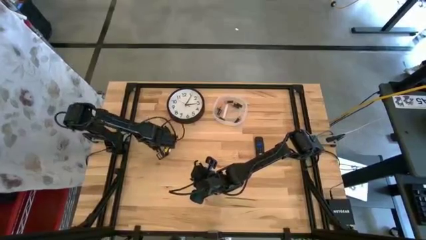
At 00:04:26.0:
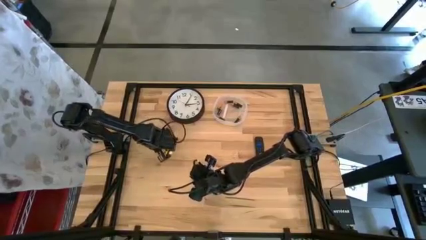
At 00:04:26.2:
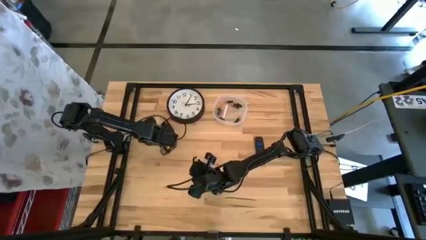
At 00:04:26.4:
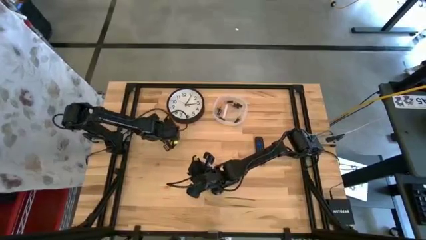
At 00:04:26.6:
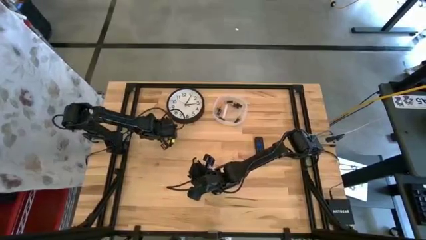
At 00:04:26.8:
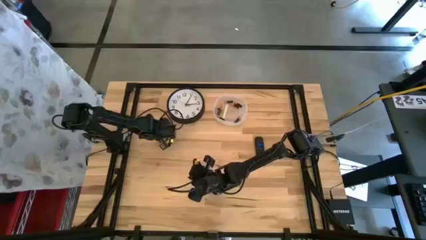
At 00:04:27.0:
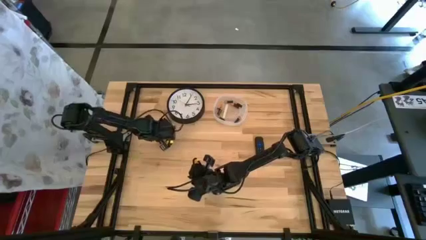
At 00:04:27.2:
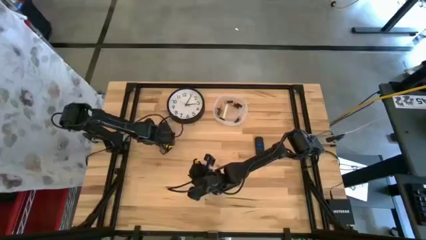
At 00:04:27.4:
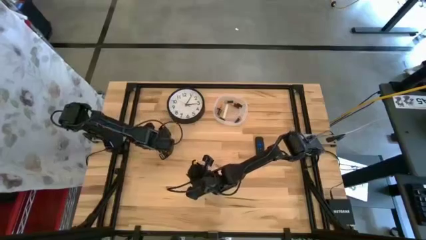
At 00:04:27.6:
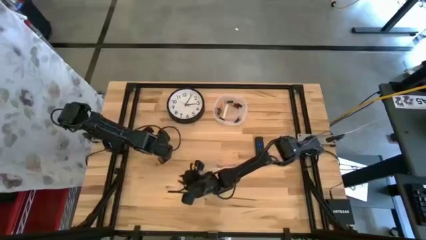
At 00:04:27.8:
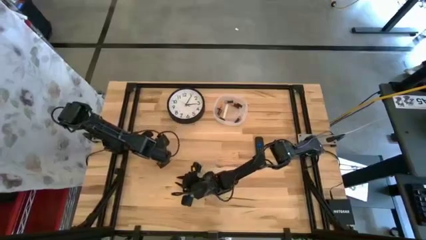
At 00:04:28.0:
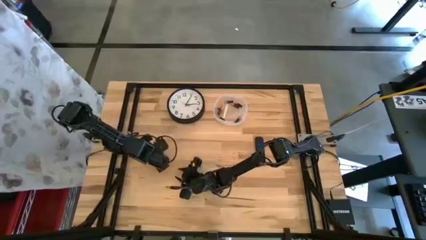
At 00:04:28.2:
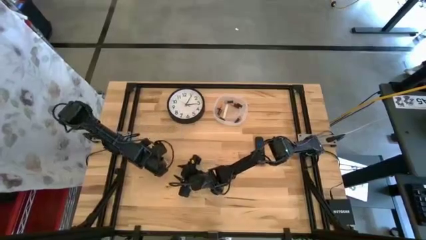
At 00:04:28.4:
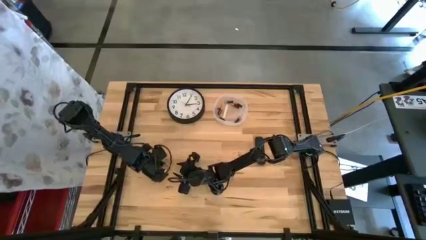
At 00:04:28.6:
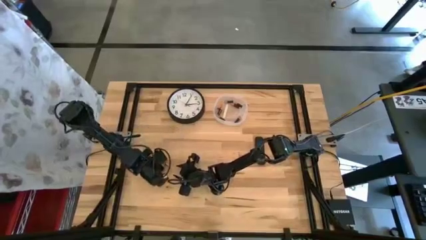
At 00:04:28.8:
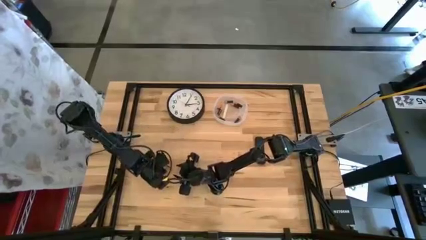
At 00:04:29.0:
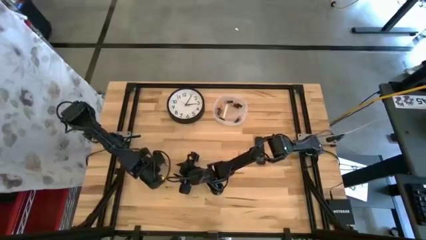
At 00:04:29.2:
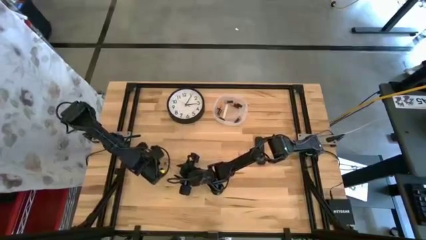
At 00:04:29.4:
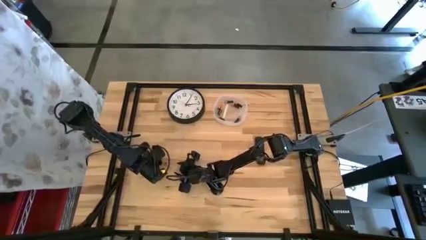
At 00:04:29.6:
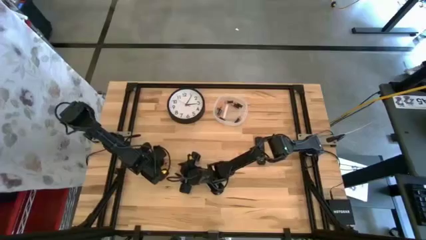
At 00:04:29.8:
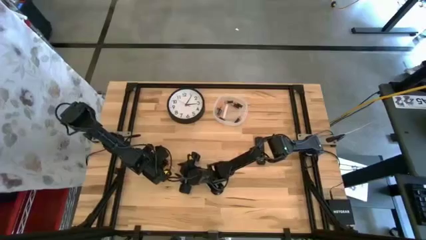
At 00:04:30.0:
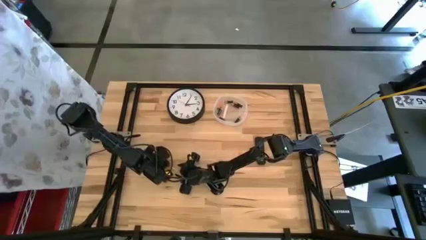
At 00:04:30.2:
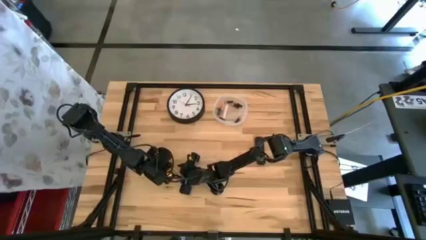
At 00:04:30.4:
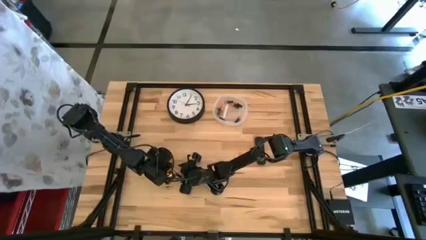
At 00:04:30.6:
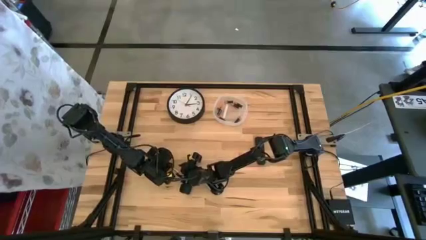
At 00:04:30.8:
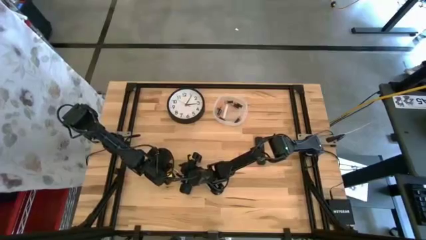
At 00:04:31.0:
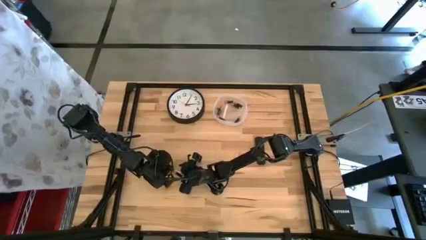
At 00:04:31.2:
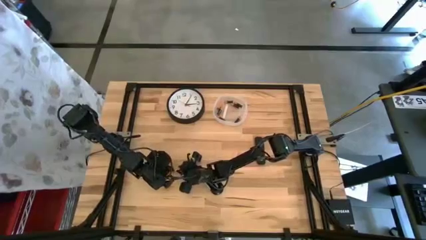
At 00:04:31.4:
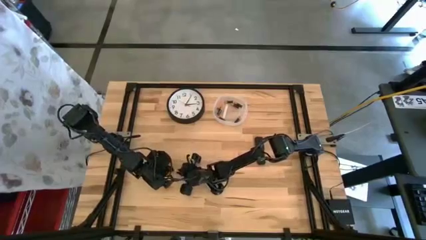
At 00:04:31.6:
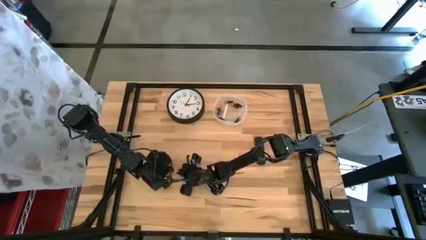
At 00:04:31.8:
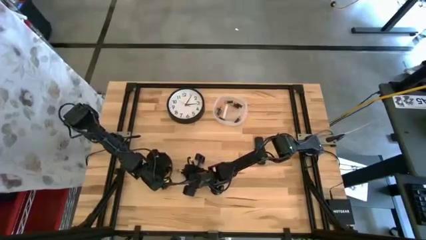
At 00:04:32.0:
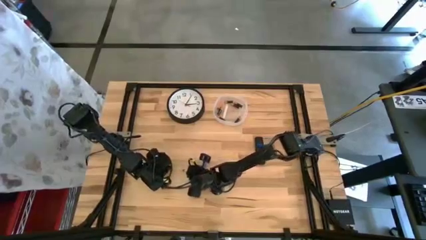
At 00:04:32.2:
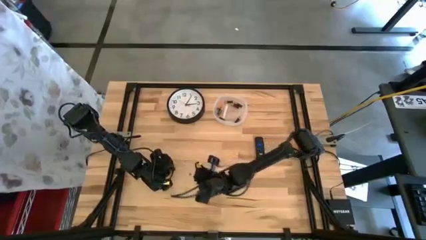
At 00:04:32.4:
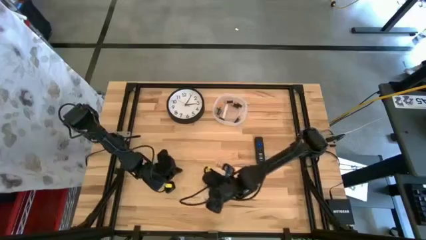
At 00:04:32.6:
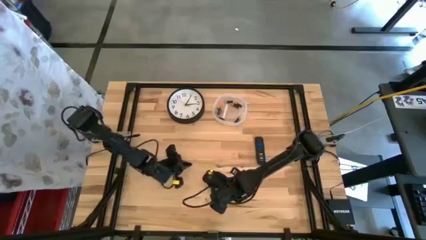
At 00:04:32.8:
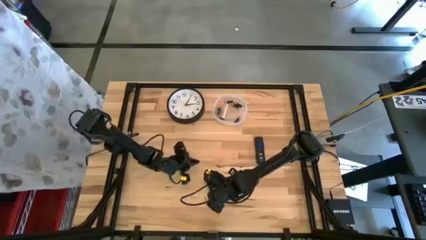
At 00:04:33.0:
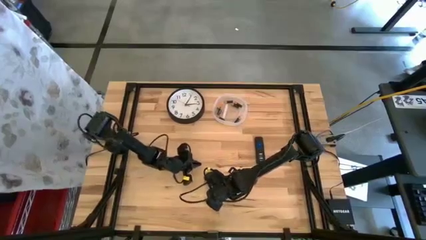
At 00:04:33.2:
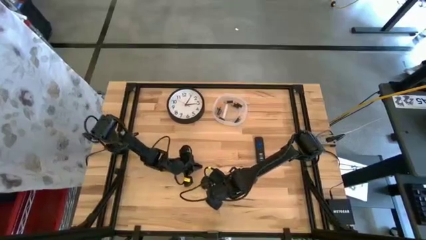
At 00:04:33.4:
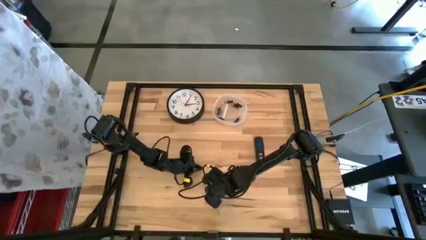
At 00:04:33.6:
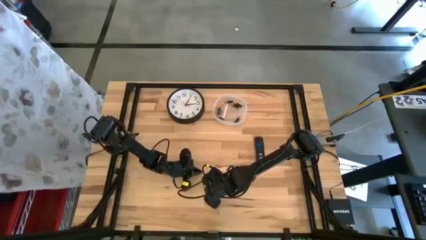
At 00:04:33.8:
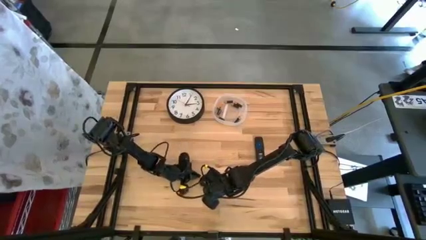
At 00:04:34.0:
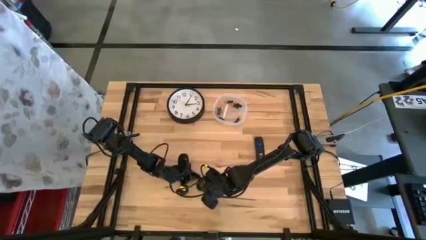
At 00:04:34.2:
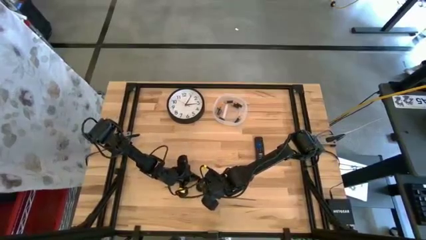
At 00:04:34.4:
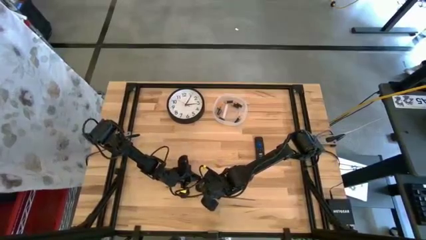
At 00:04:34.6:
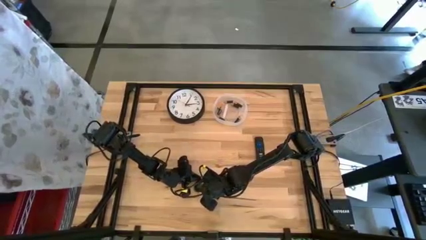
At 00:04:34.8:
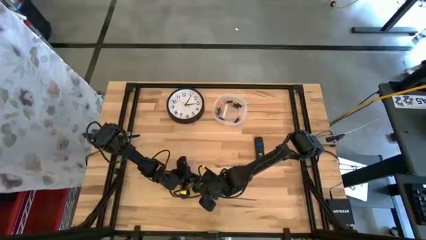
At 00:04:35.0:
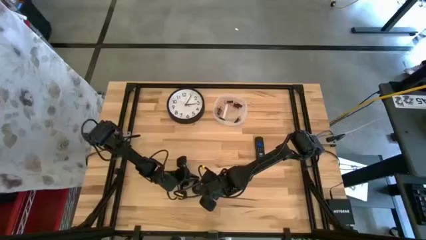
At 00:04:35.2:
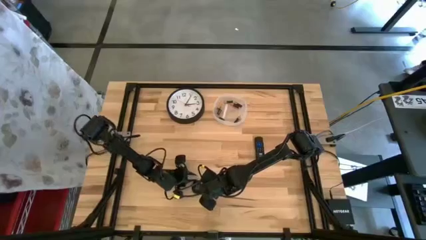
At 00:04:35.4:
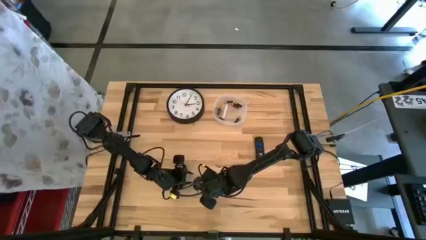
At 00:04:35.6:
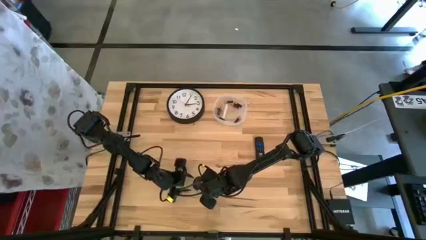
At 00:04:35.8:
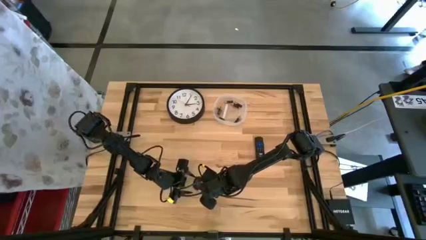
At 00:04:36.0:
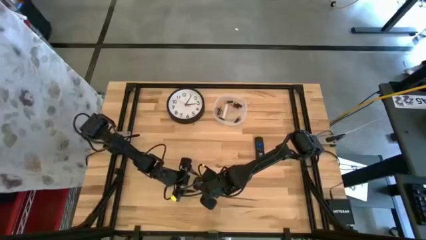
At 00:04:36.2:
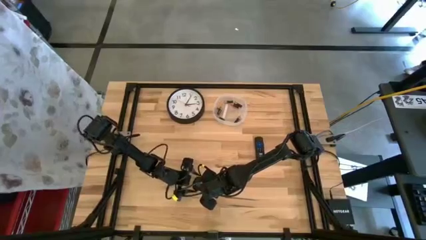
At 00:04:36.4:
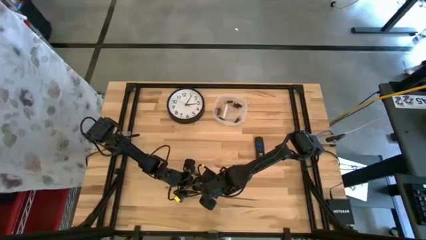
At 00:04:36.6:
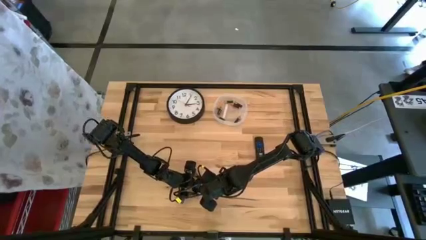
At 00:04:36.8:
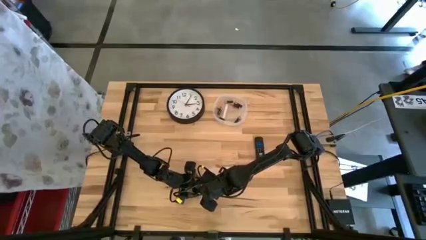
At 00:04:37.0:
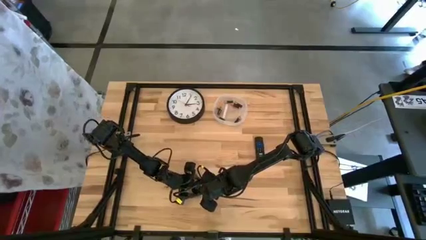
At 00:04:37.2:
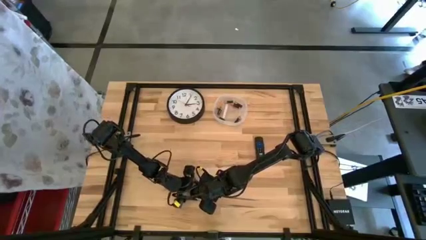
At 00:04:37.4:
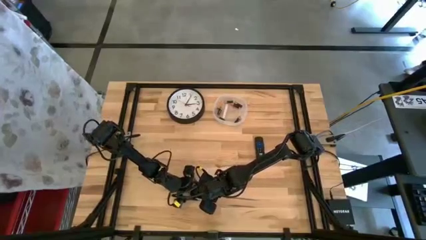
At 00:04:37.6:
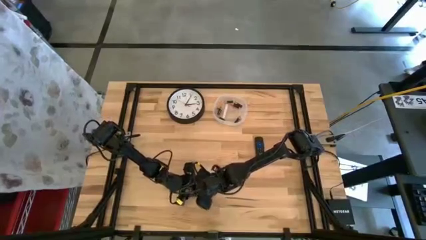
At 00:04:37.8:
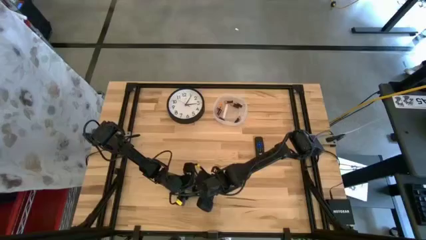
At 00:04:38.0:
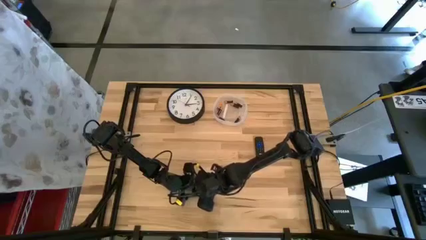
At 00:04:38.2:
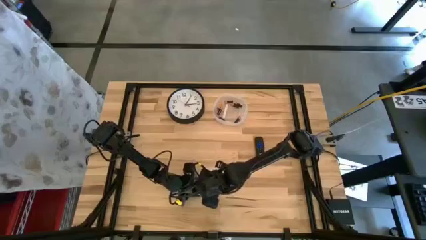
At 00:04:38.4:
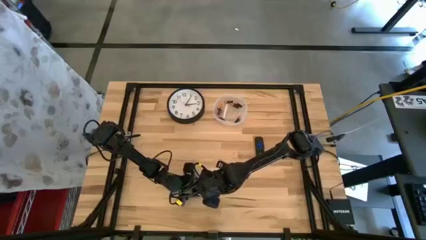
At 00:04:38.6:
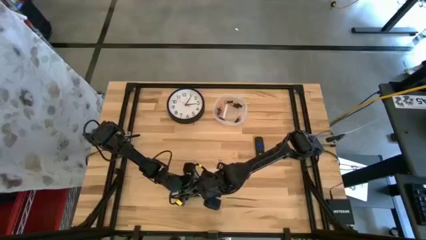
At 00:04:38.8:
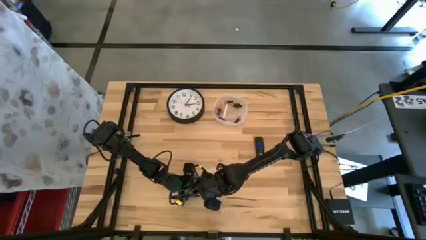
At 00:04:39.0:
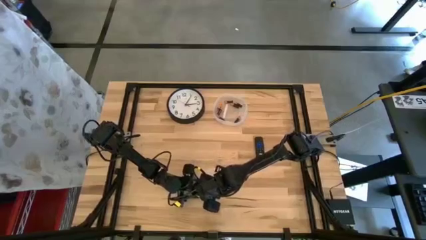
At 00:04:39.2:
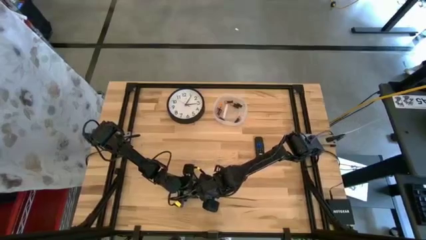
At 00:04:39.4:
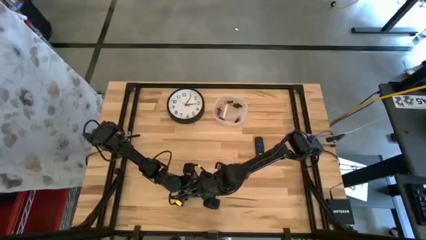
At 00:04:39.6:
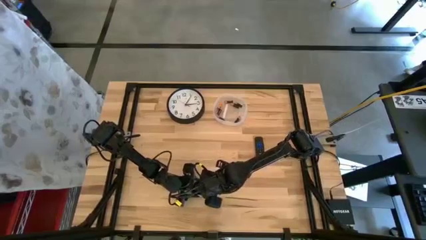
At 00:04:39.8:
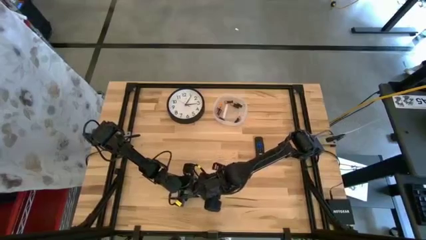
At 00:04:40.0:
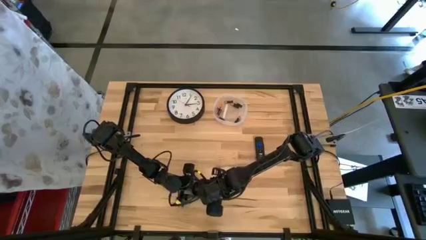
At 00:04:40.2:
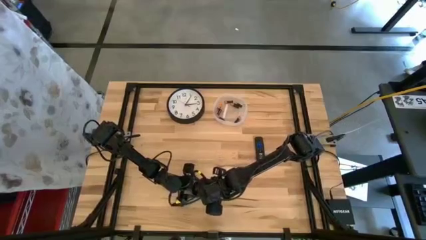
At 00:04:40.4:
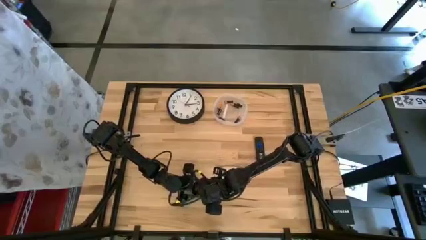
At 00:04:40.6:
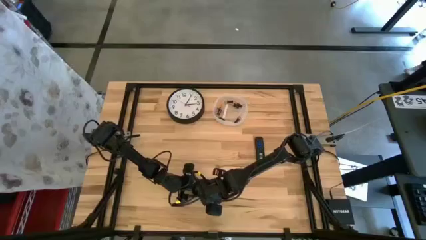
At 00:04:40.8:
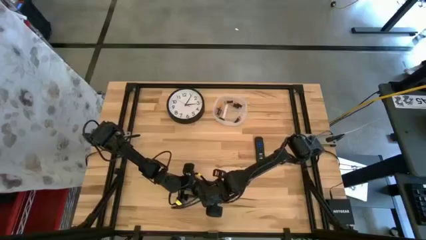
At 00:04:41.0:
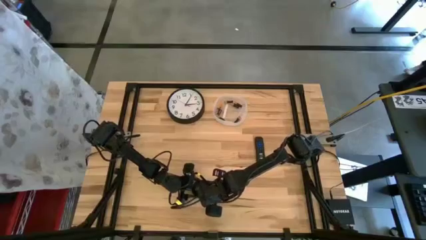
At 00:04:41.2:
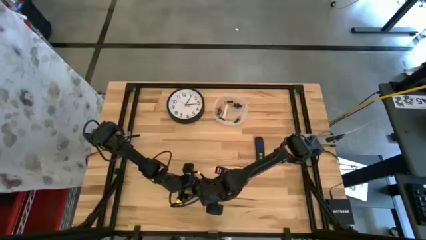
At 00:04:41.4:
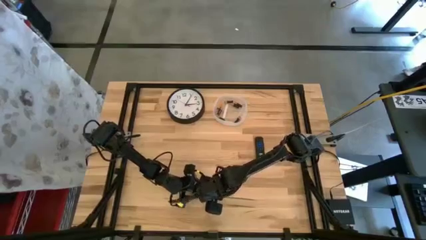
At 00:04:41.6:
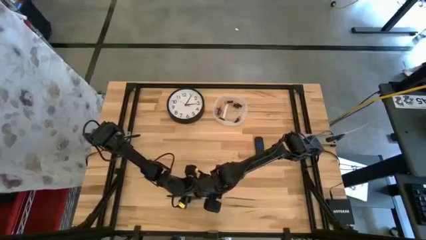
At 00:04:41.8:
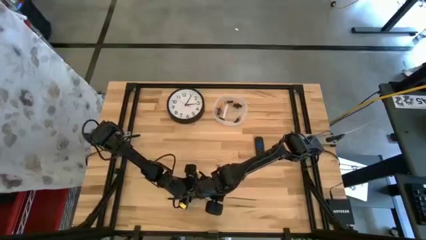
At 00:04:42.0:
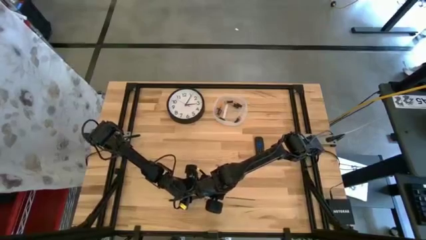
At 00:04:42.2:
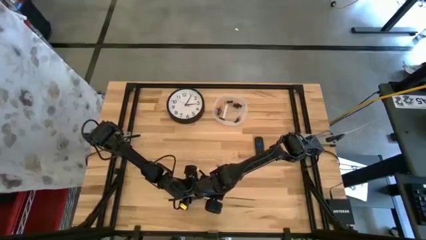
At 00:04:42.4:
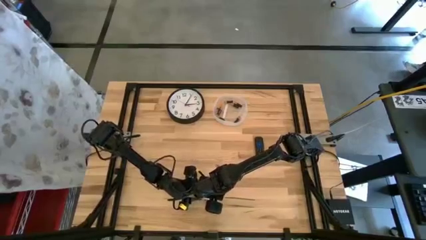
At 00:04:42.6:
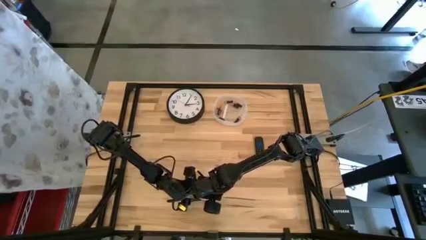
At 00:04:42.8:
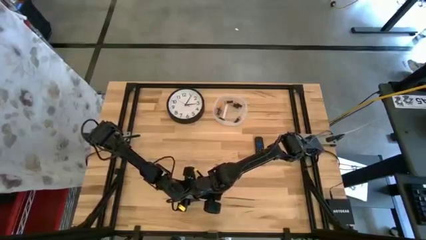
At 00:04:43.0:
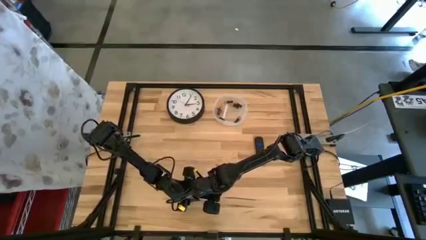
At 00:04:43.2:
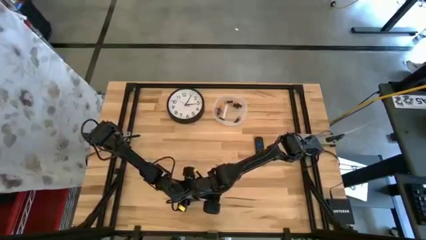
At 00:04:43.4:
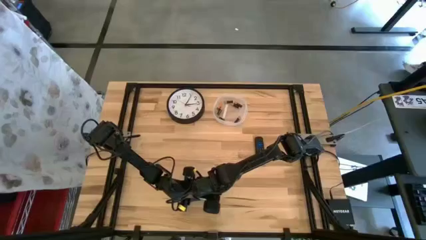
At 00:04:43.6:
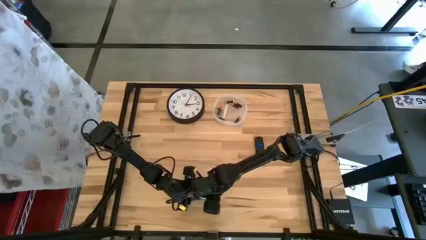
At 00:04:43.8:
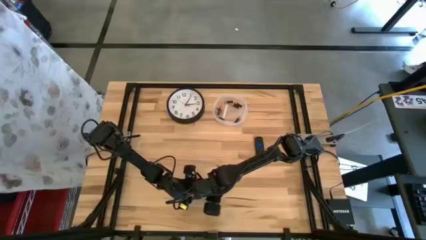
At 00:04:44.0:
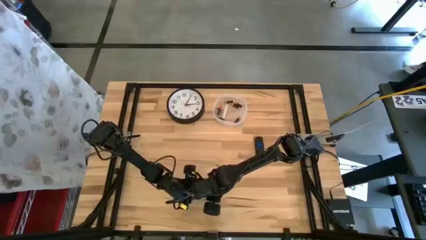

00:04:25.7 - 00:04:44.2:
Task: Insert battery
Insert the silver battery into the computer mouse
